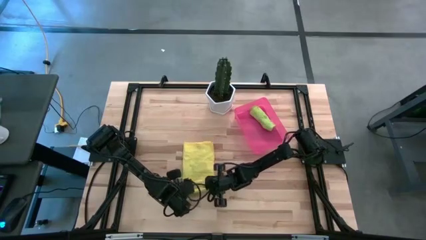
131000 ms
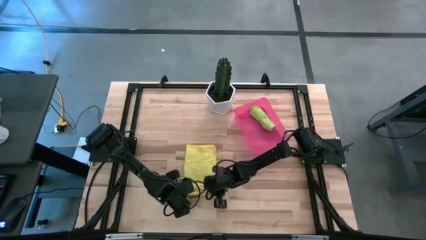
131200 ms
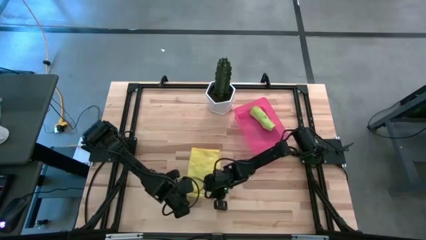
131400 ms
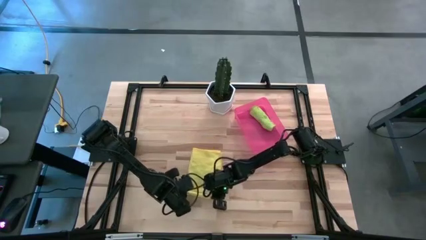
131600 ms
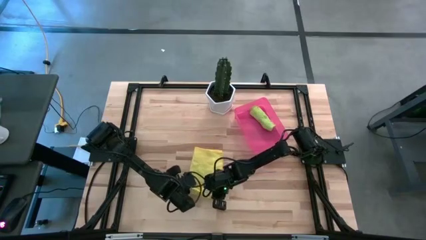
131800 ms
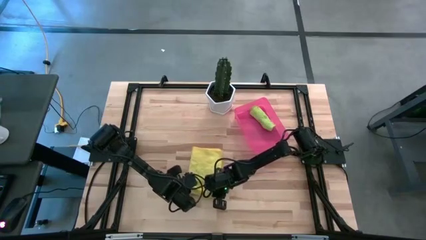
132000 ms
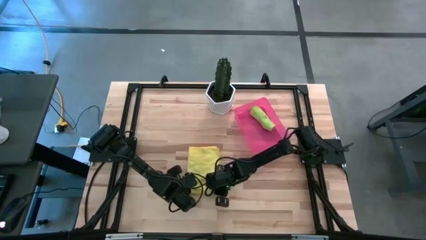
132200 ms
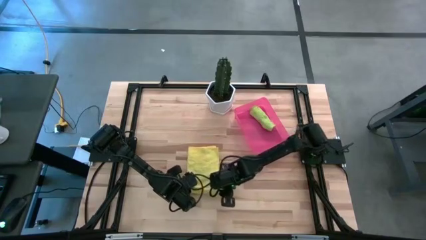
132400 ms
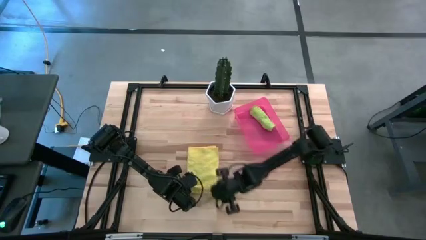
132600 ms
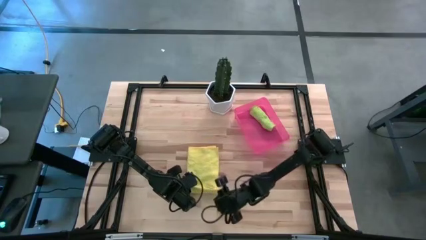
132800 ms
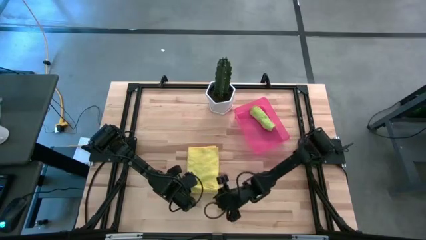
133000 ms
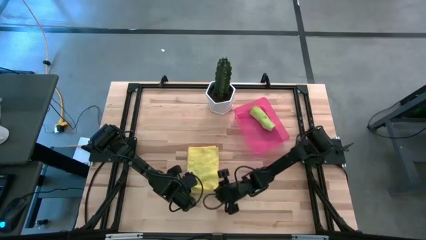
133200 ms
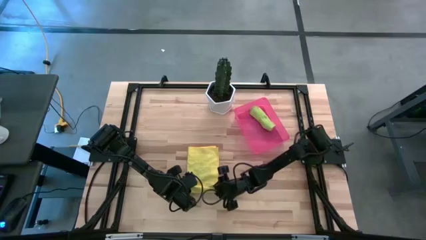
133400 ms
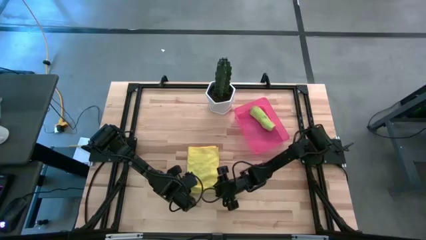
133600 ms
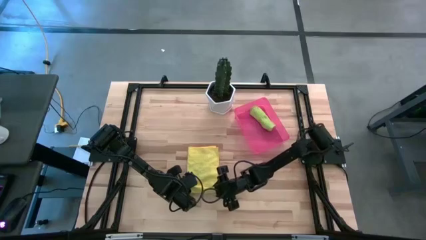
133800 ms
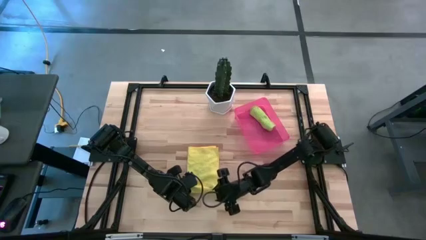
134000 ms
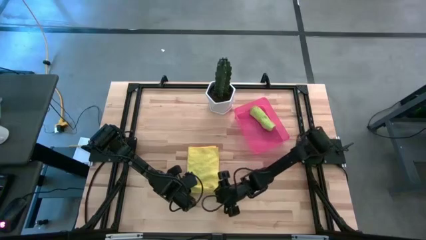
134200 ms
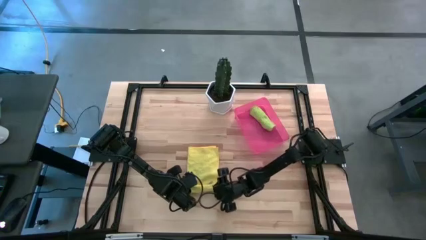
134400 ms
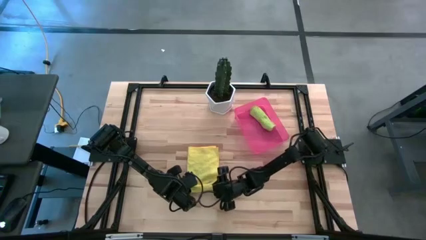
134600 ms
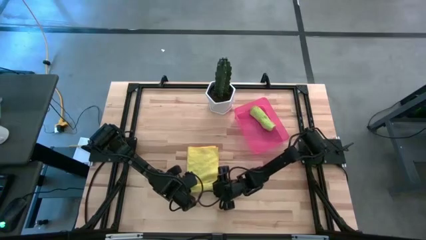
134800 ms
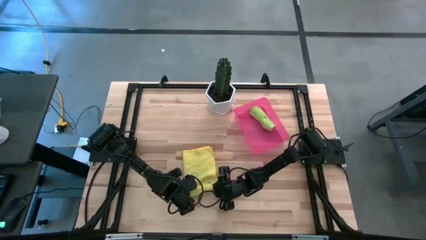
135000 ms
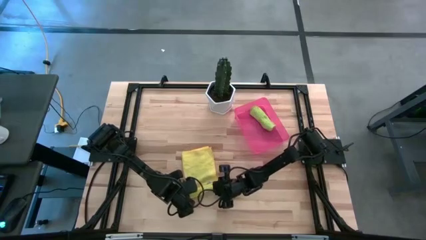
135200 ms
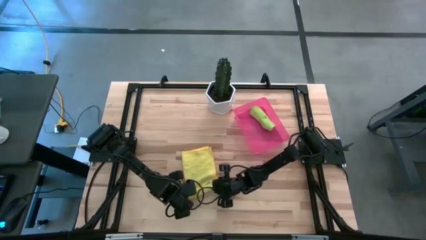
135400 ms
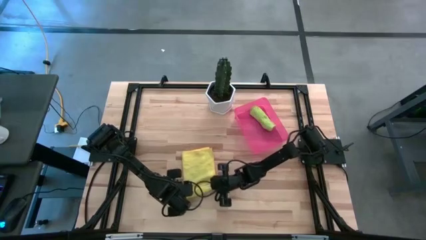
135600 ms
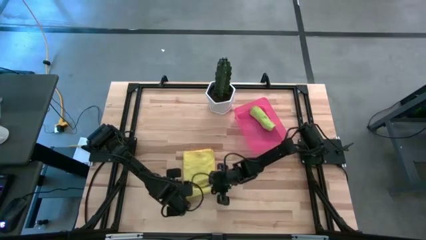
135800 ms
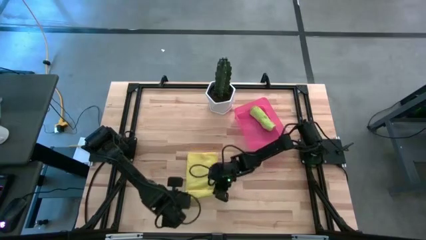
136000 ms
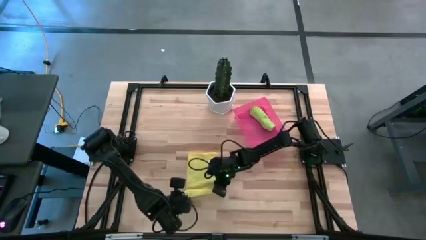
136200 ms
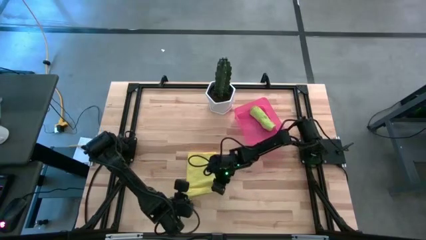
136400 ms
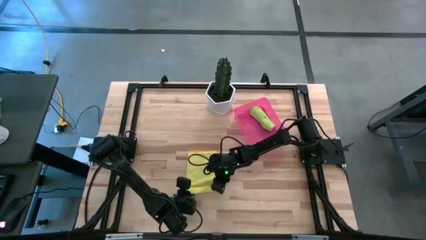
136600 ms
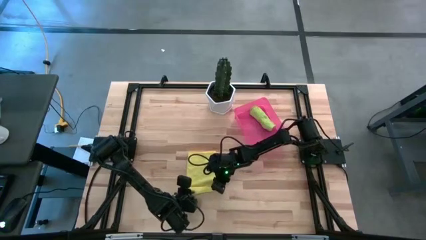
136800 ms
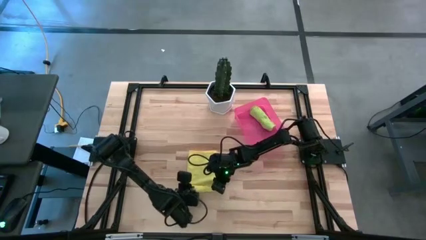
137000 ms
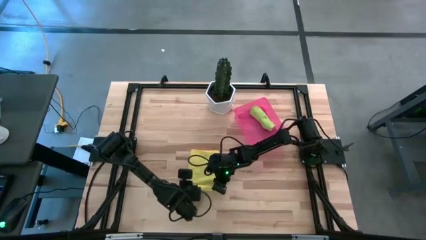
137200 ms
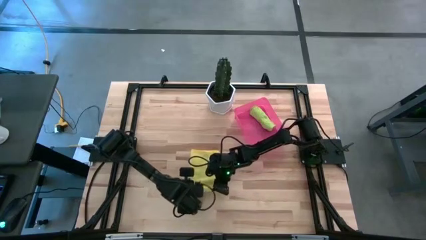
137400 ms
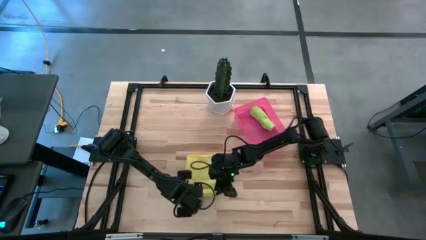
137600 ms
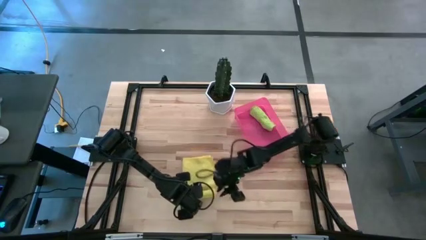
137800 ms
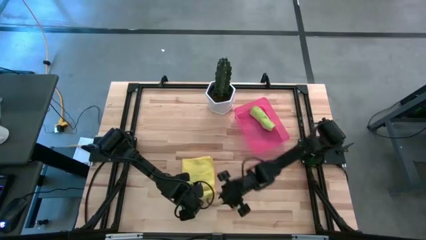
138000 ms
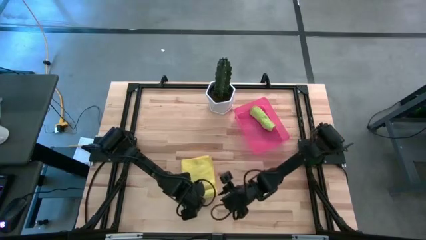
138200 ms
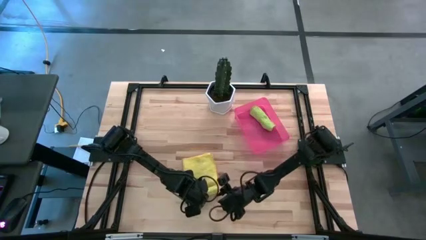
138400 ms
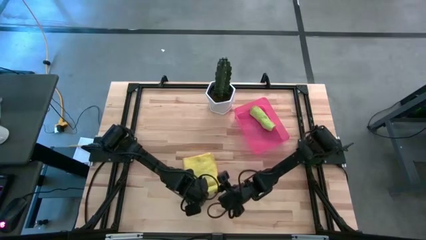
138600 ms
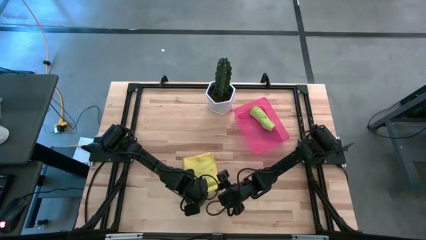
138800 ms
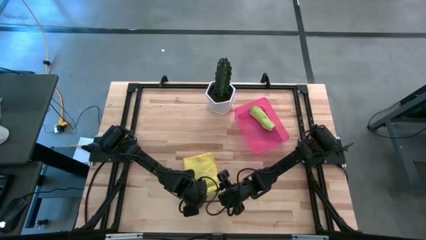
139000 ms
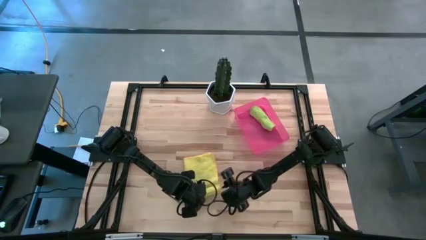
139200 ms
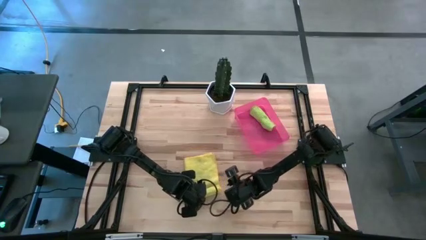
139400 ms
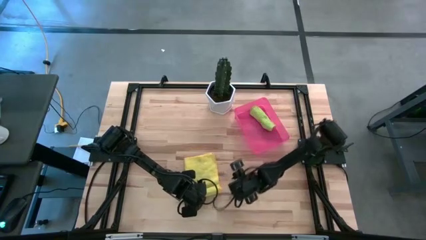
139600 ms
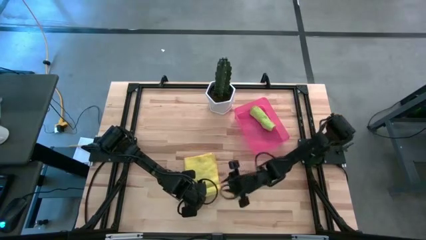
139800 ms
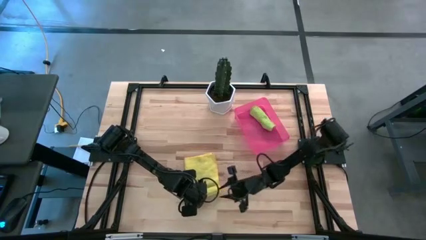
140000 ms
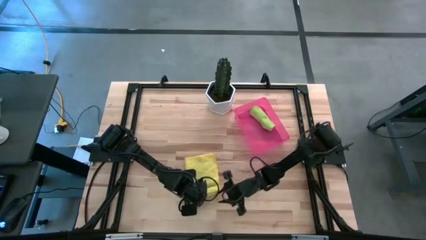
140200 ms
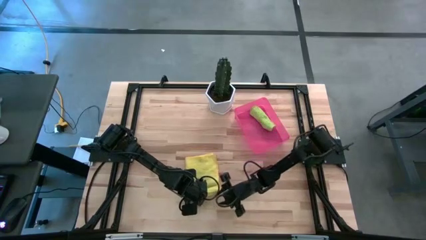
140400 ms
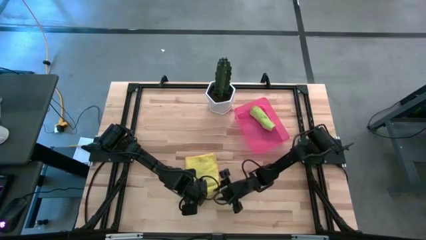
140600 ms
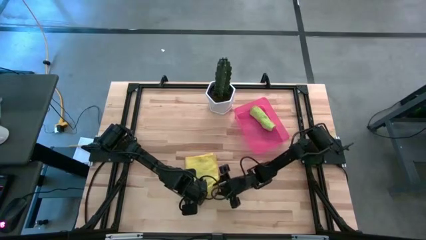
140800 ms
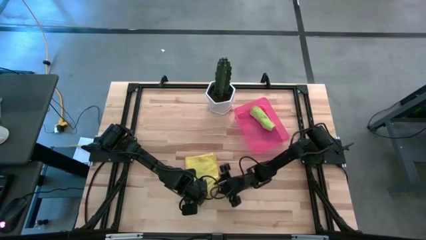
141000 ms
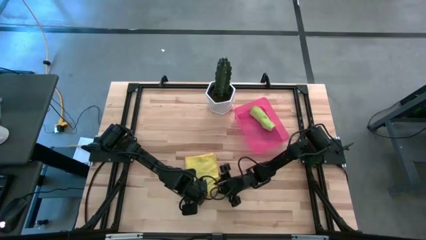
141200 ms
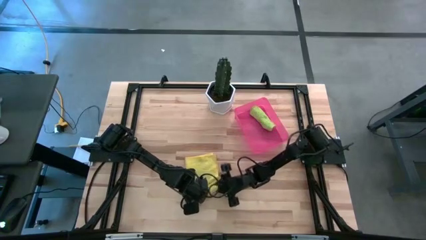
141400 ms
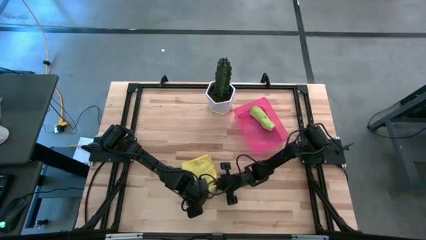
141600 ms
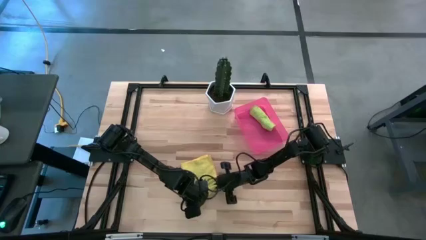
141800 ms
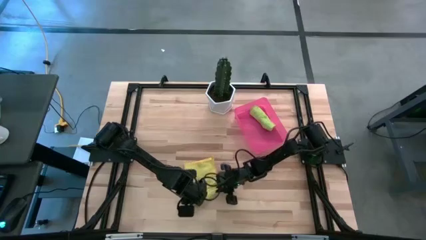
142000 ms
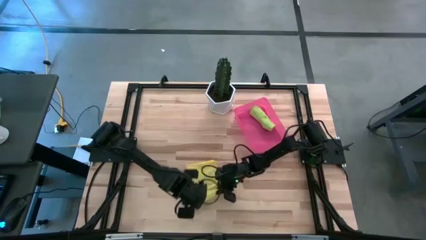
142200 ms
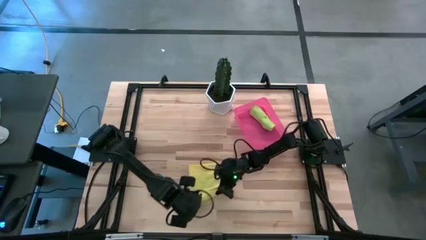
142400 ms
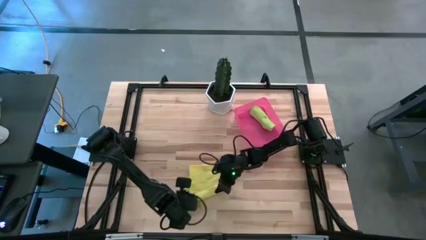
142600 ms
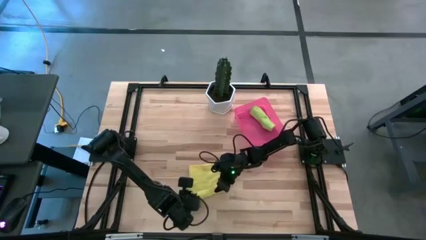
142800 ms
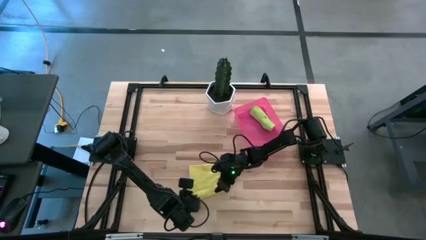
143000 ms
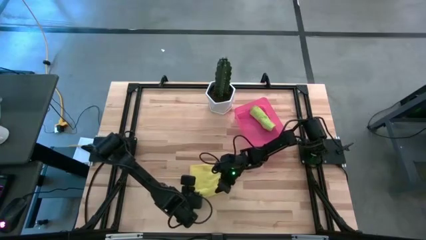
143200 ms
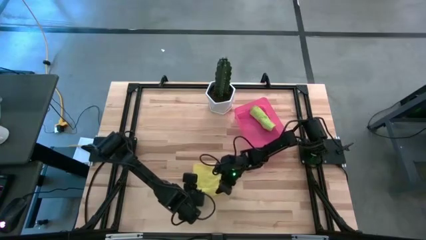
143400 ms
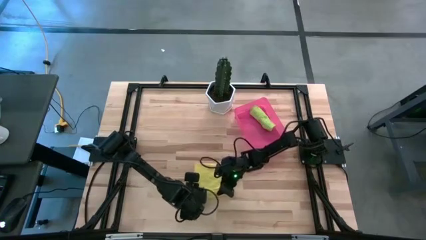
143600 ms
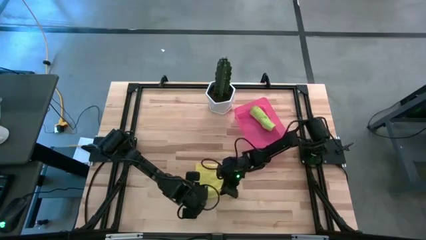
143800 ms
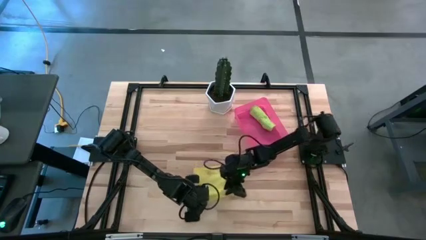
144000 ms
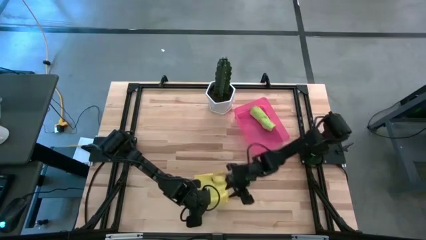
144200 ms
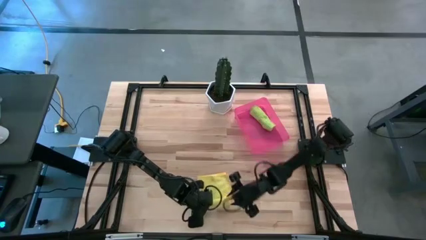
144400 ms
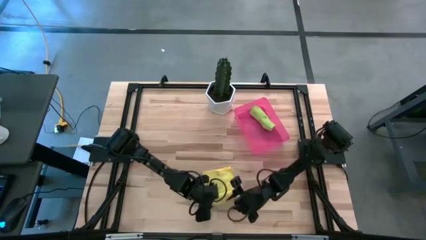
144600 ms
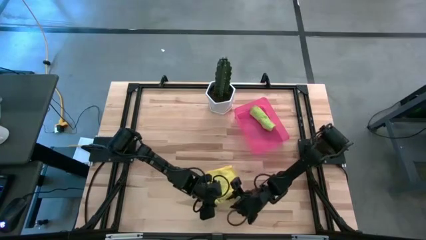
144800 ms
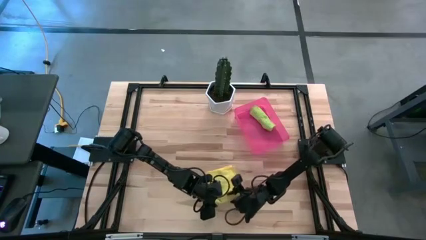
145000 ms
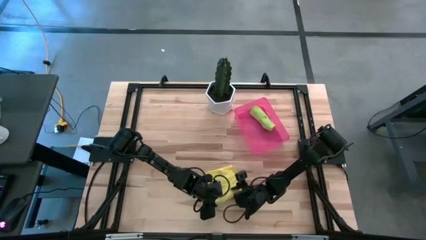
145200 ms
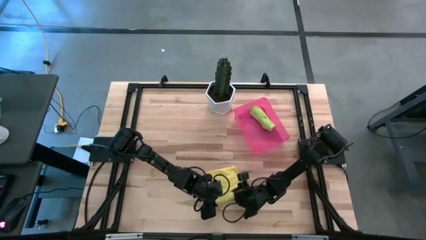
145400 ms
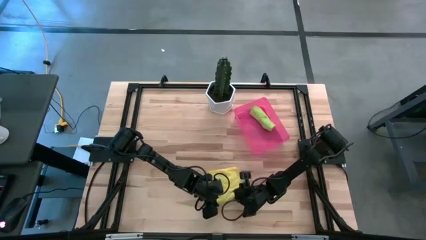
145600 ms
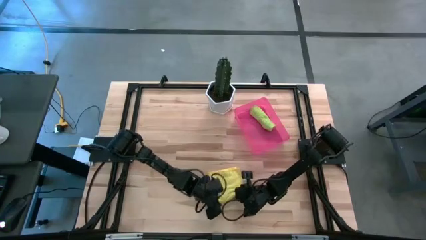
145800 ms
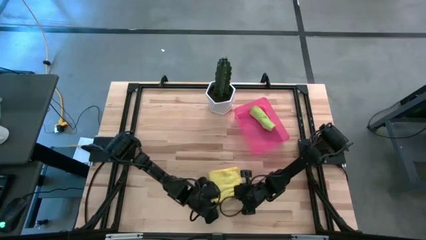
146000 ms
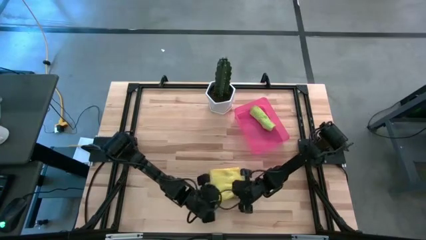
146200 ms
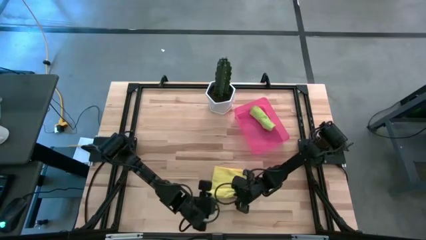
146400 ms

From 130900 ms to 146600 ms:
Task: Roll microfiber towels into tight, uniform cylinder then place into a basket
Roll the yellow towel
